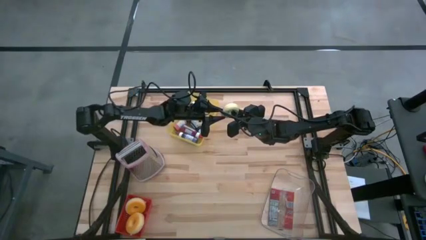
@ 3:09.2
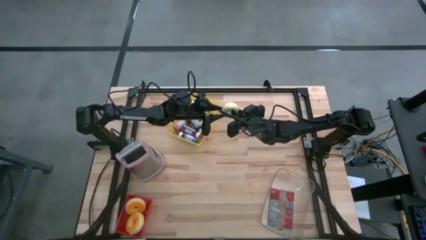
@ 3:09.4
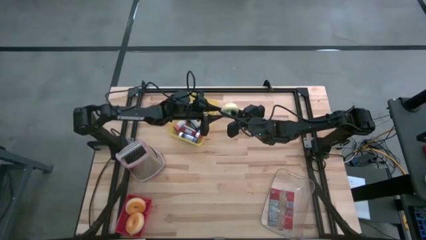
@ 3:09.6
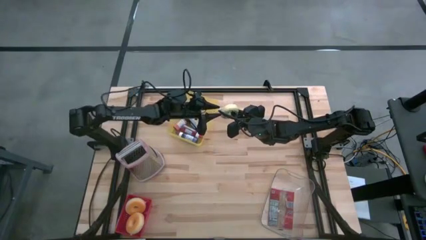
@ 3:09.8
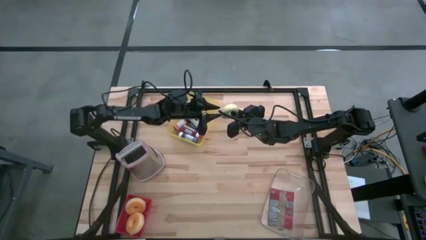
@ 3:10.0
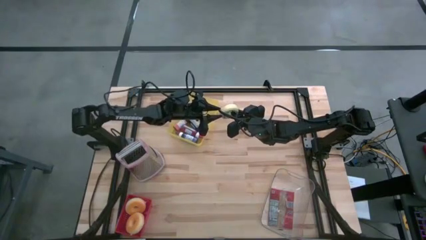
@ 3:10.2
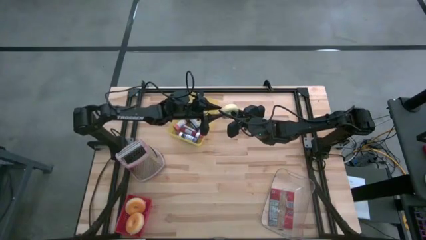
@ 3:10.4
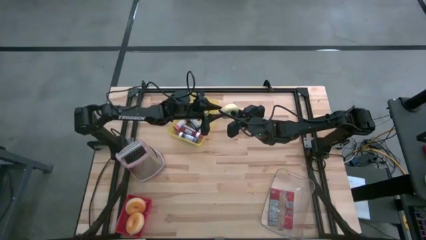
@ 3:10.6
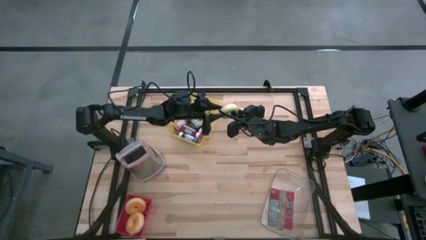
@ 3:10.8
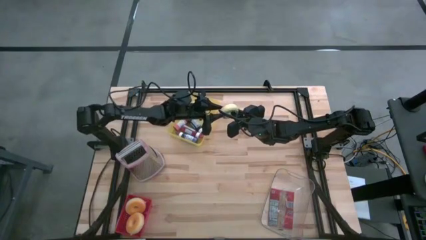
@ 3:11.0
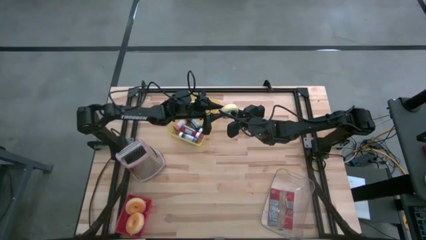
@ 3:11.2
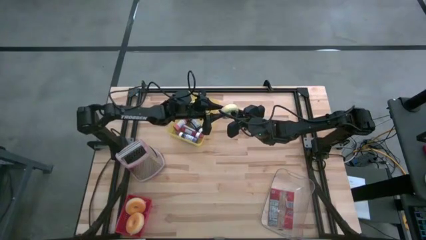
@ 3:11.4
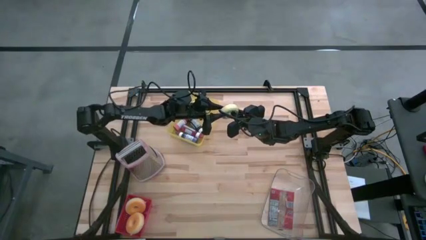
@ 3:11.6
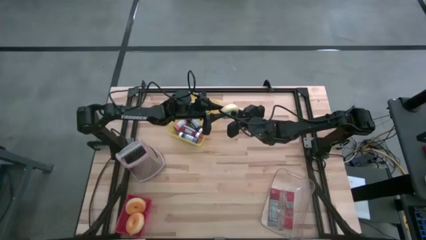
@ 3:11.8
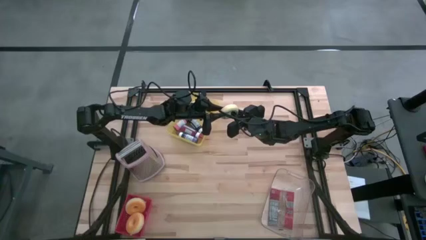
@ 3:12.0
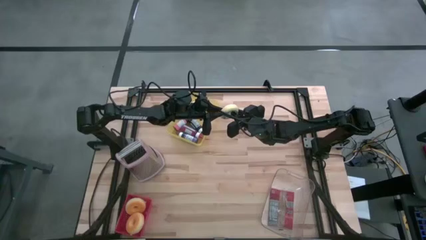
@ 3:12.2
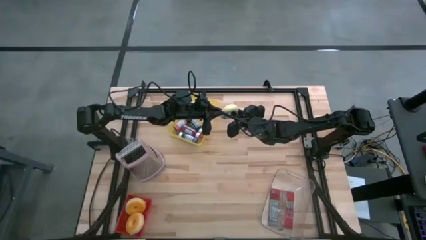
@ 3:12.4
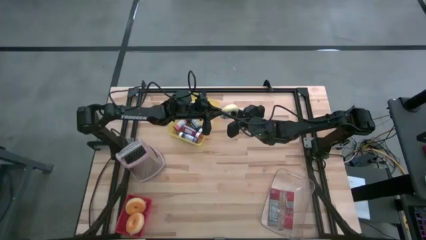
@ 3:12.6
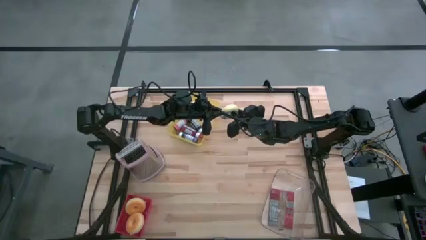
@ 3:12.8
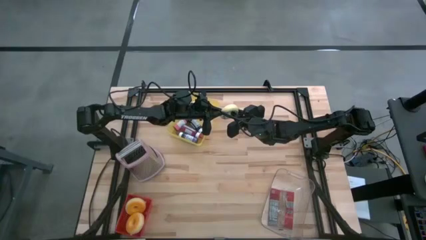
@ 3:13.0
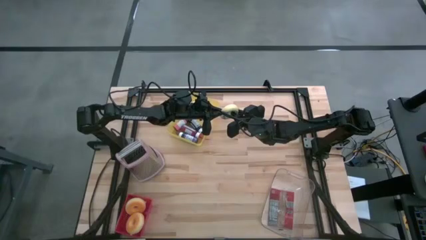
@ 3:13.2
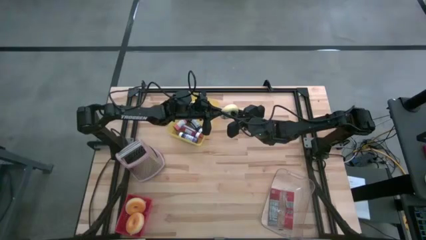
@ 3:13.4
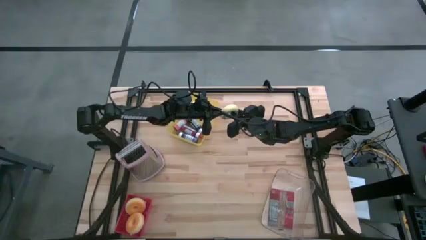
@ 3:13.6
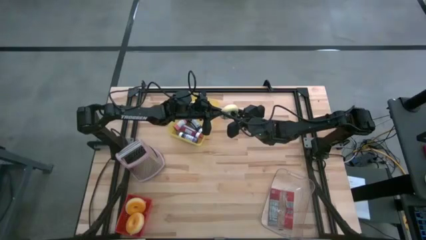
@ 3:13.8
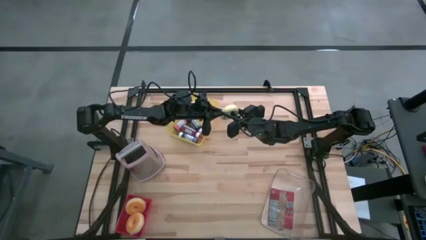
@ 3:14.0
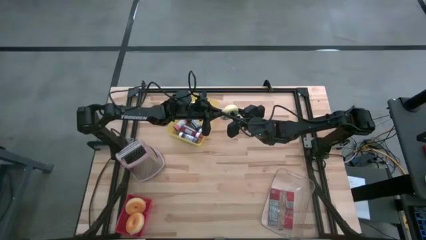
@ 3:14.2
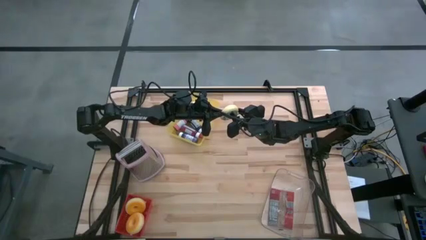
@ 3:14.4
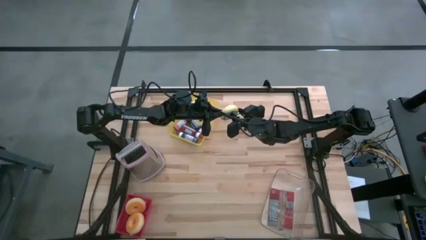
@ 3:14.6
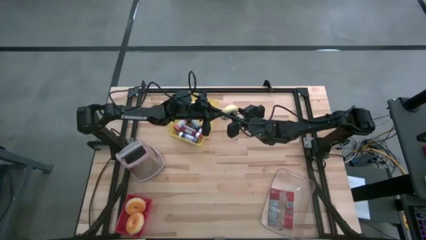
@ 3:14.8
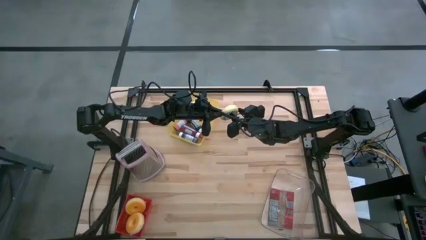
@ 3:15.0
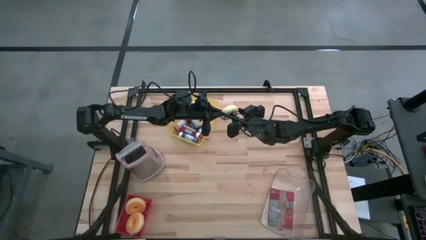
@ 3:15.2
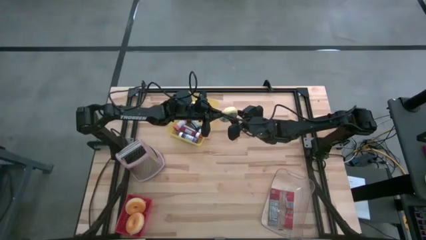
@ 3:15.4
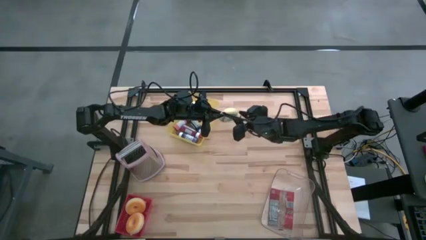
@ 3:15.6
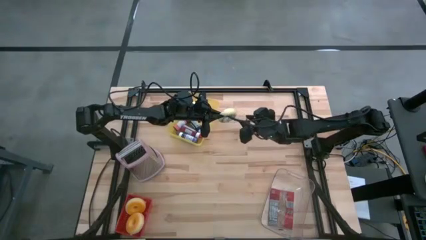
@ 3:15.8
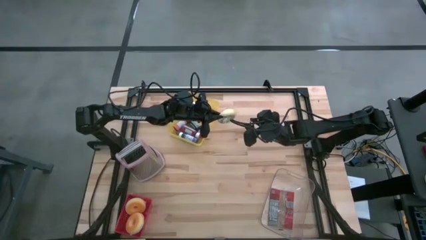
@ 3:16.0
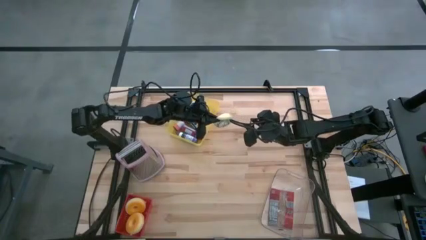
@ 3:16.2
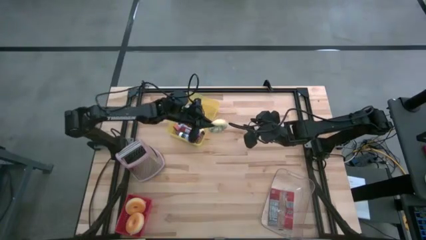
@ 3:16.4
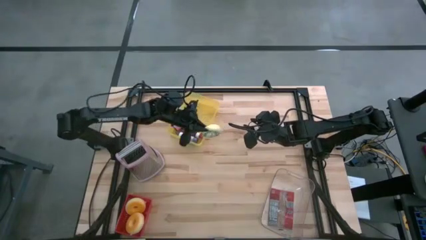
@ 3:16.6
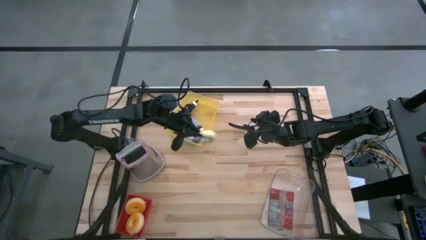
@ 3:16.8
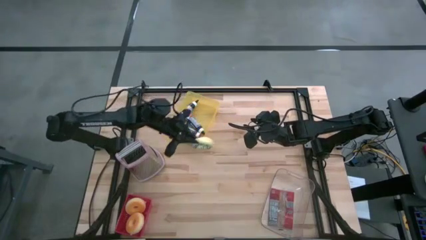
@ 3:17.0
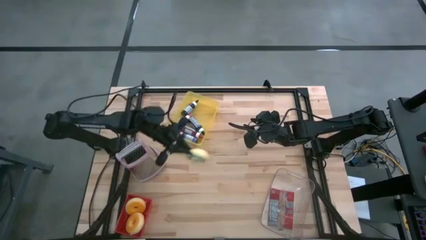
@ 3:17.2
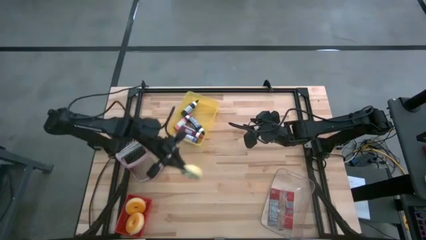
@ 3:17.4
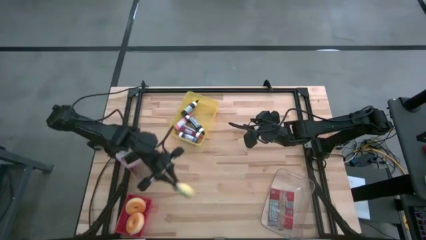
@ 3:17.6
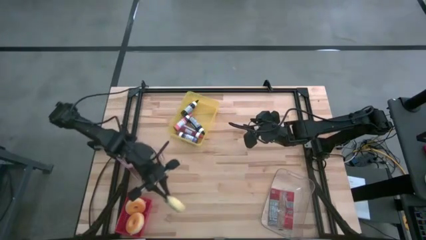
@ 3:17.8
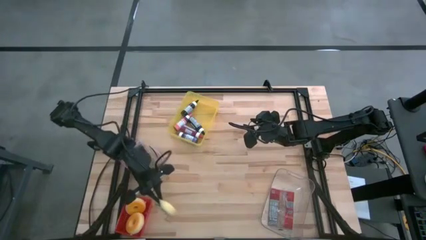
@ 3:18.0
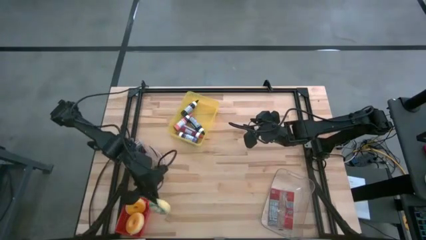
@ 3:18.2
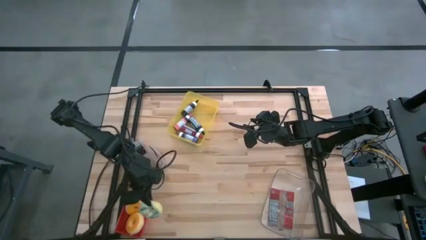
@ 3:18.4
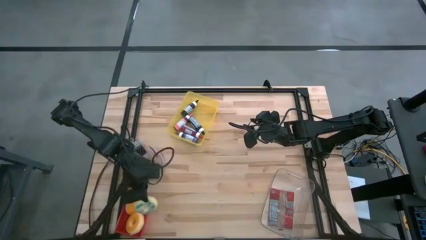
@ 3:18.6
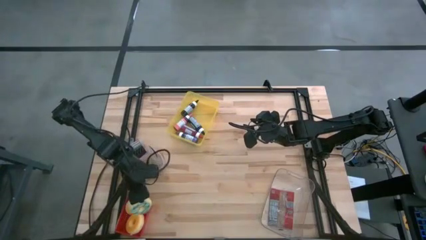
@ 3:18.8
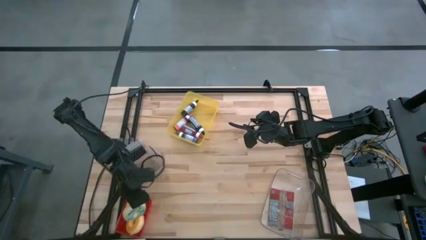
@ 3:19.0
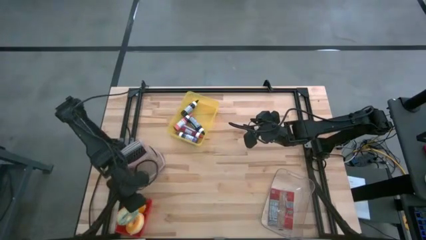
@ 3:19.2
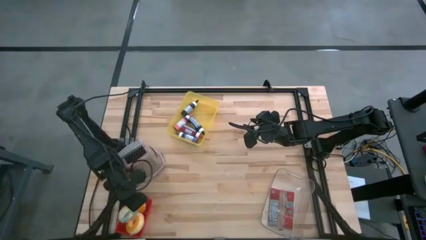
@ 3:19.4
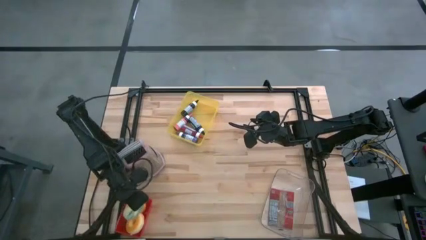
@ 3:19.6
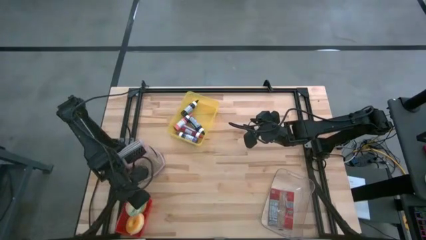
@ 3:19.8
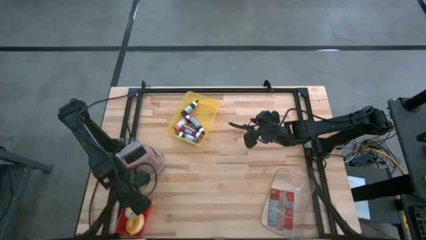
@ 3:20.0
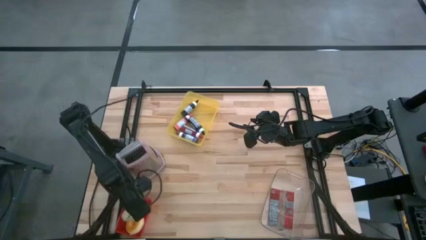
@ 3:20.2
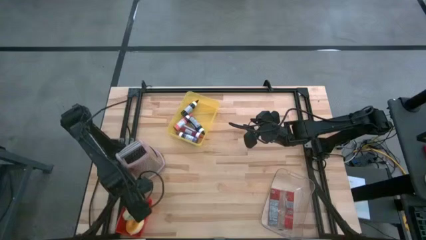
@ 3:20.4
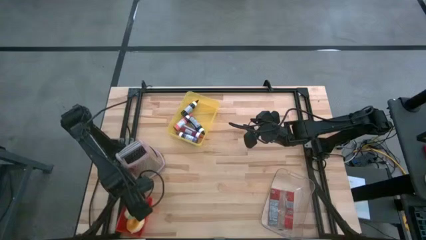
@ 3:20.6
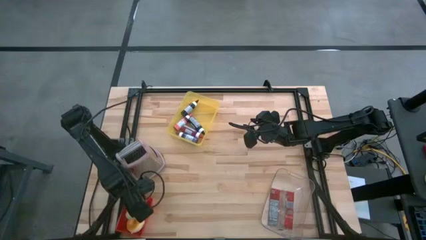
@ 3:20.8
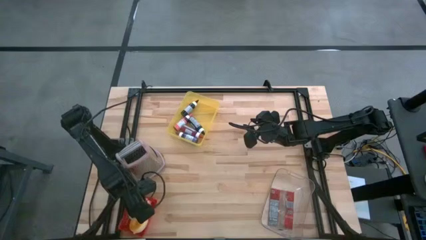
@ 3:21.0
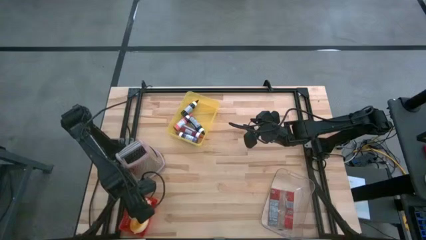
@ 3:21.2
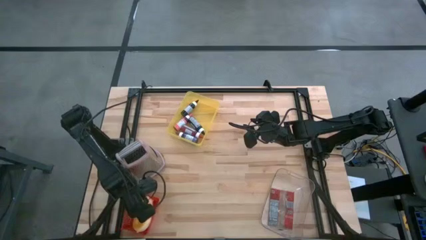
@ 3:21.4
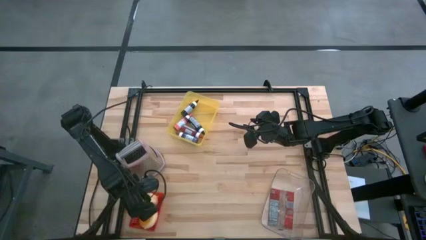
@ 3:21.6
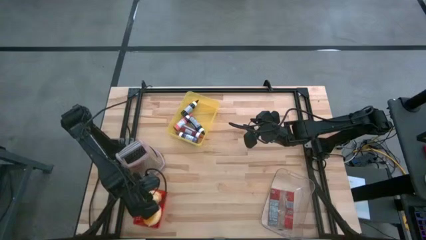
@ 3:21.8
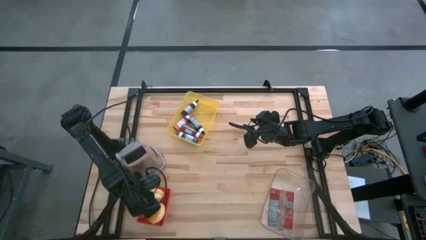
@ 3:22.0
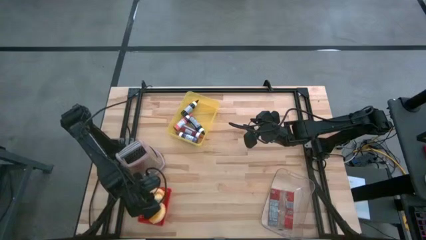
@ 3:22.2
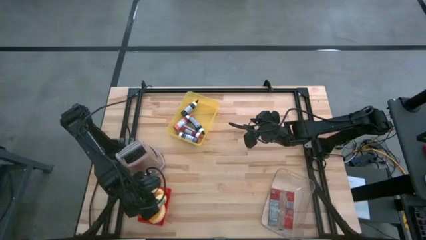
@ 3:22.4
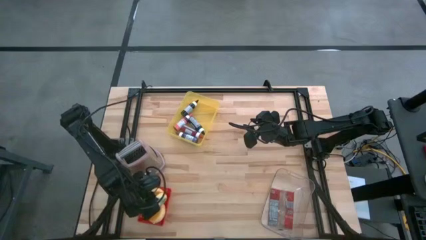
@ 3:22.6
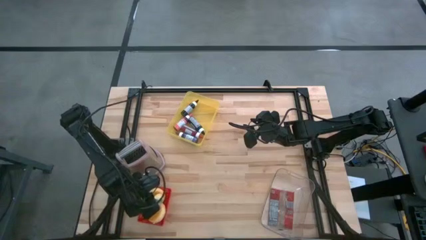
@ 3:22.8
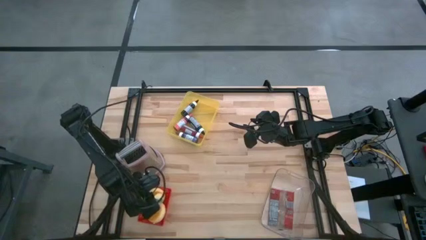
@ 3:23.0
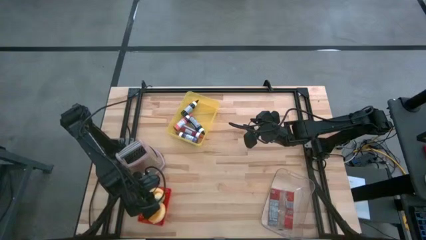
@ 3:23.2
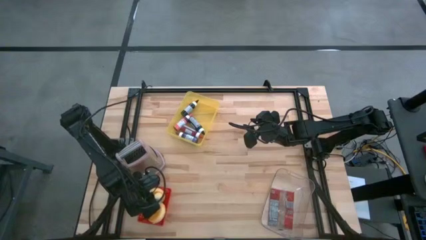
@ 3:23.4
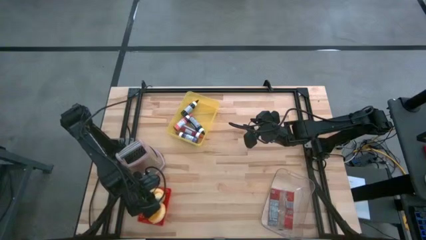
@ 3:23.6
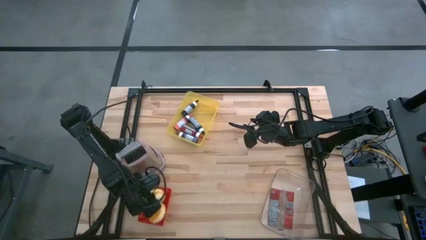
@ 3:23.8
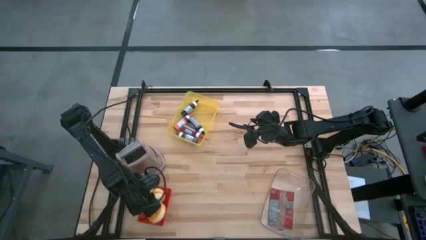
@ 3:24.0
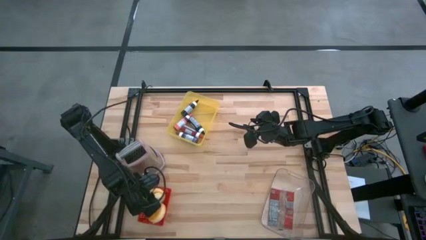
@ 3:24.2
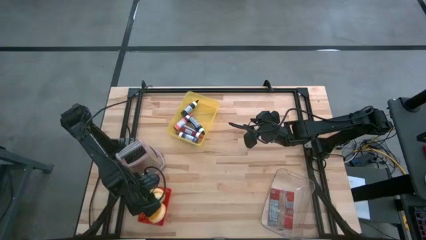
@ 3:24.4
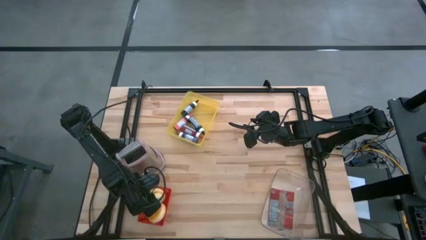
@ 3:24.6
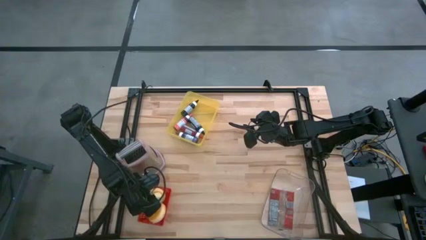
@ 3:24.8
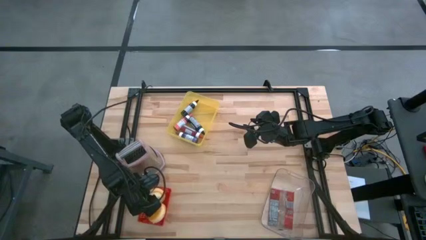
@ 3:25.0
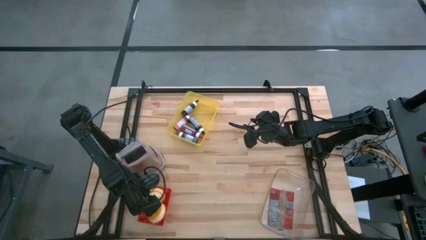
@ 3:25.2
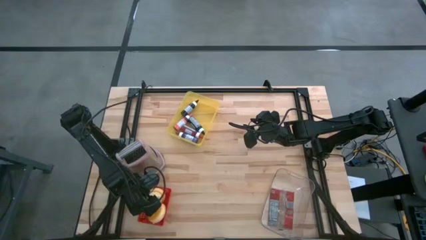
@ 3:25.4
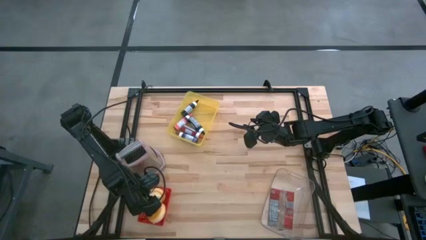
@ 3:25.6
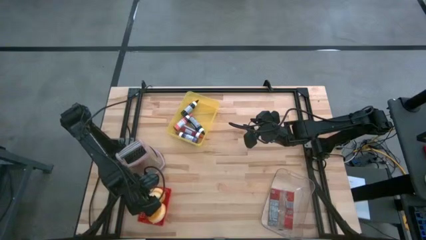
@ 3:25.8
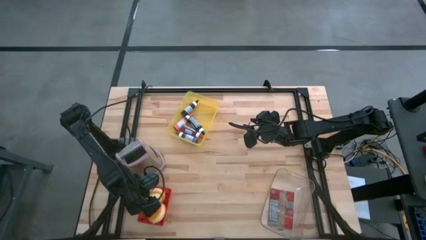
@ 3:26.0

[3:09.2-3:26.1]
Task: Pick & Place Food Item
Put the blue donut into the red bin
